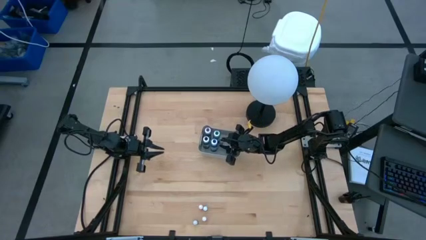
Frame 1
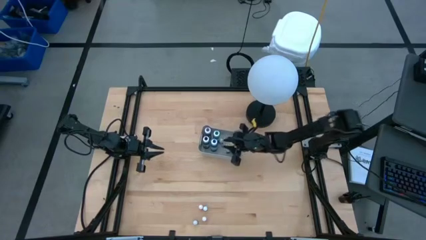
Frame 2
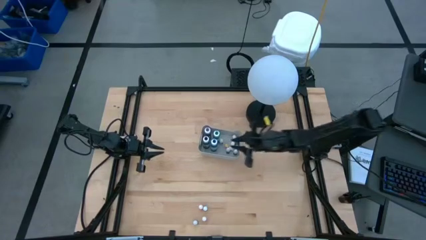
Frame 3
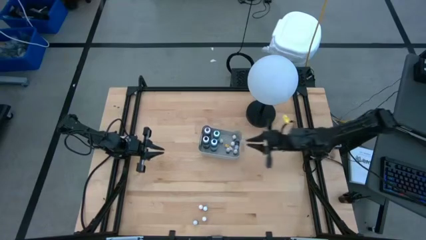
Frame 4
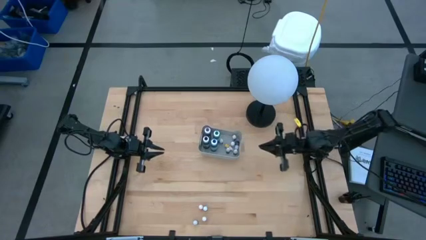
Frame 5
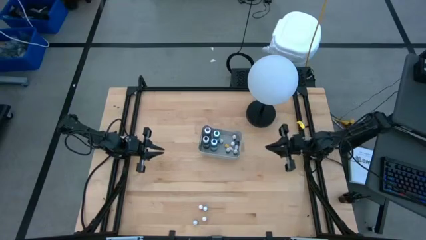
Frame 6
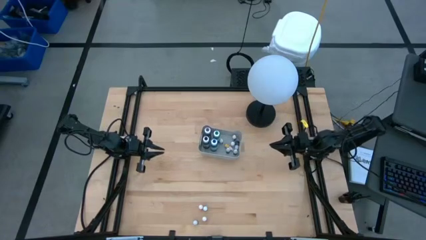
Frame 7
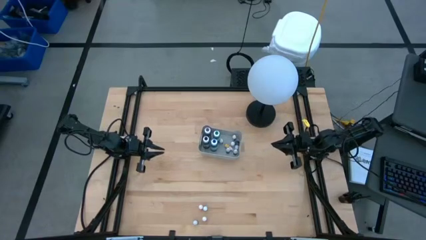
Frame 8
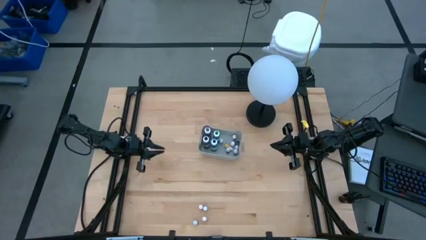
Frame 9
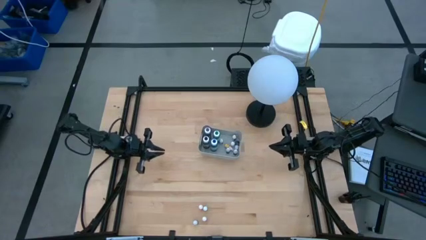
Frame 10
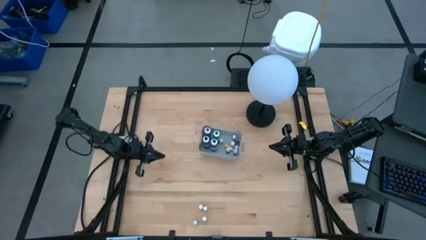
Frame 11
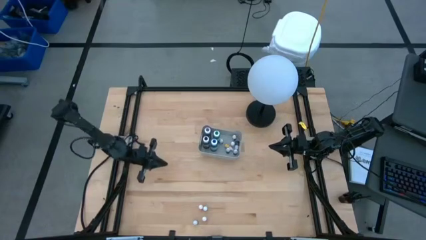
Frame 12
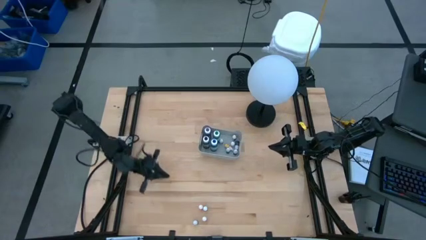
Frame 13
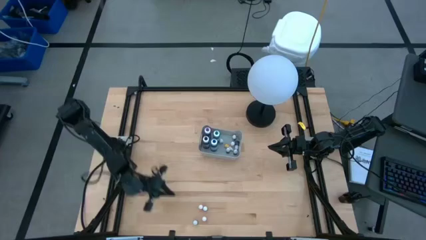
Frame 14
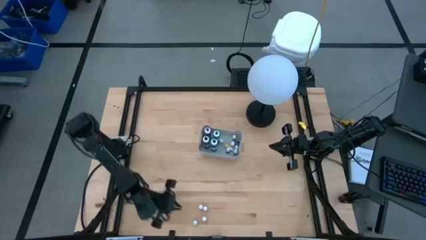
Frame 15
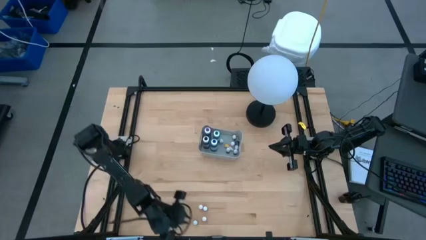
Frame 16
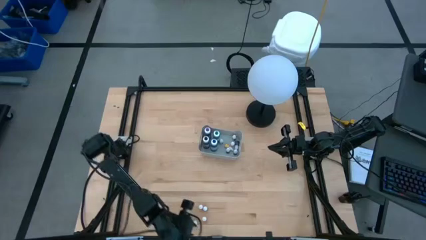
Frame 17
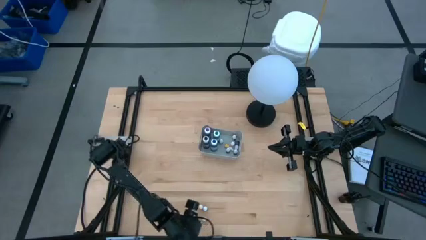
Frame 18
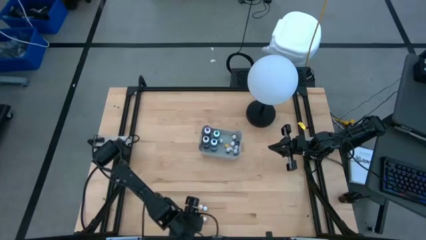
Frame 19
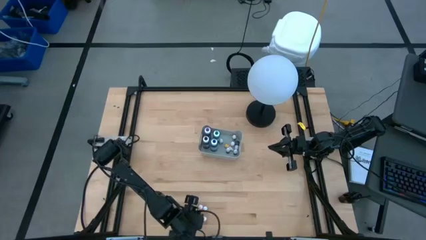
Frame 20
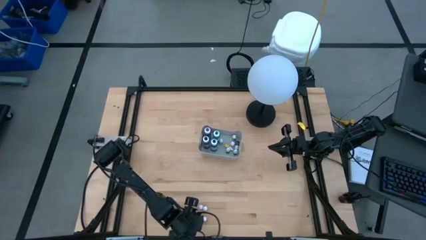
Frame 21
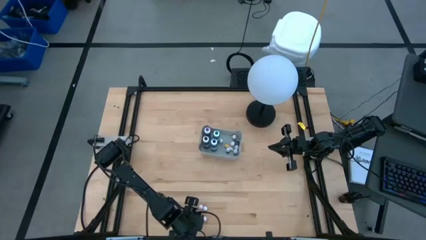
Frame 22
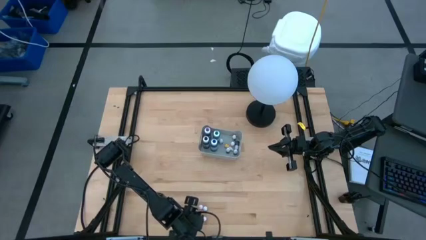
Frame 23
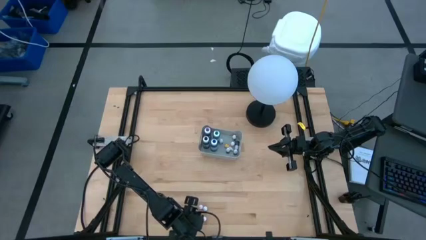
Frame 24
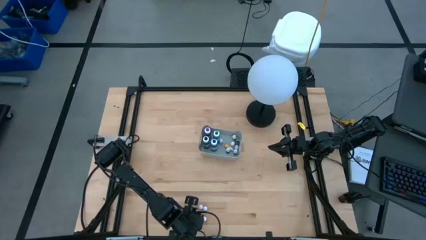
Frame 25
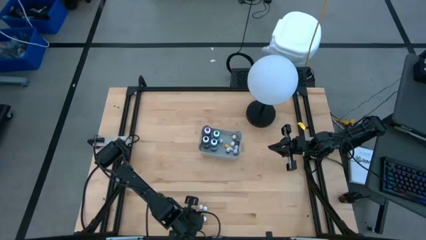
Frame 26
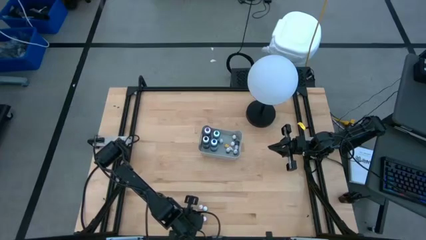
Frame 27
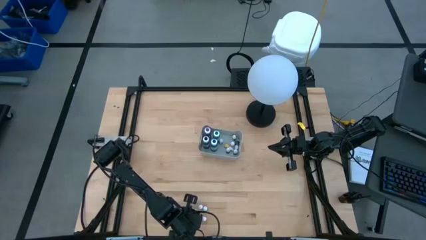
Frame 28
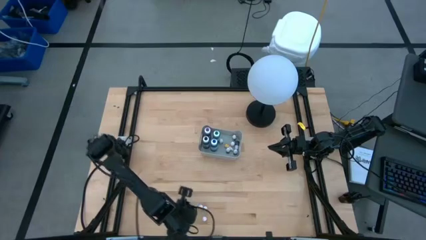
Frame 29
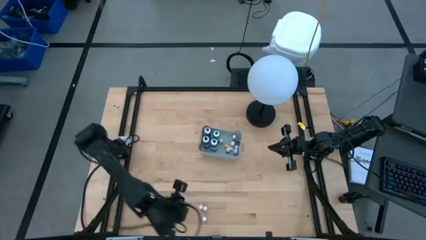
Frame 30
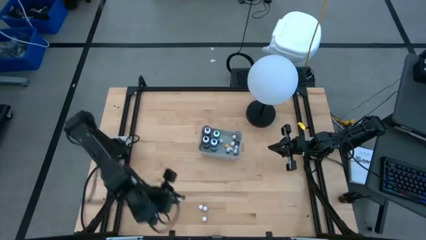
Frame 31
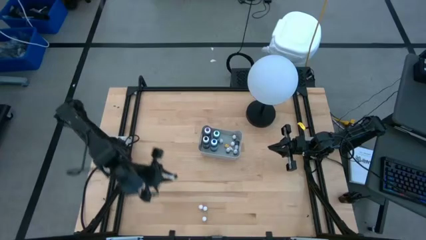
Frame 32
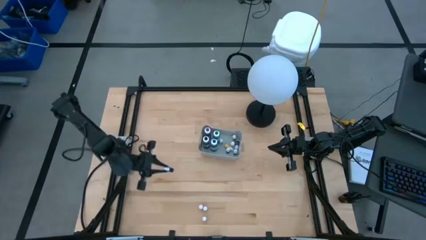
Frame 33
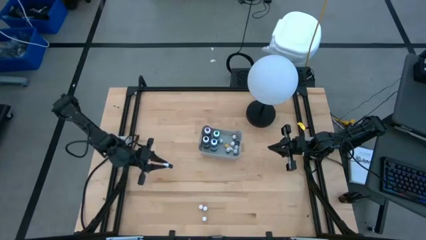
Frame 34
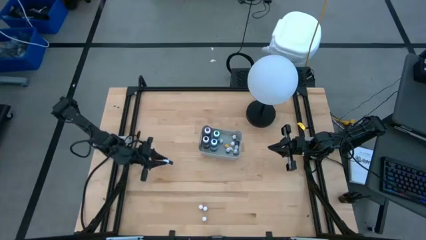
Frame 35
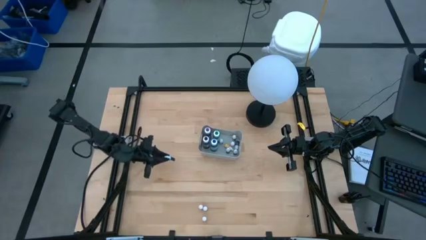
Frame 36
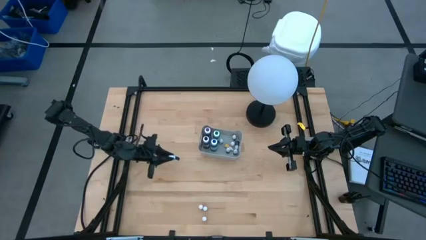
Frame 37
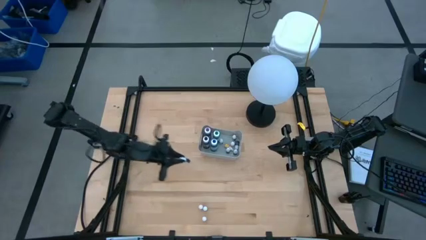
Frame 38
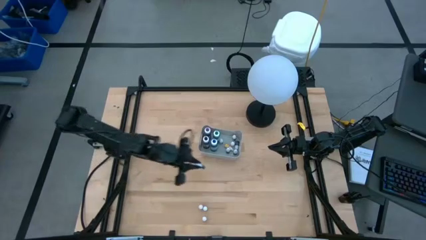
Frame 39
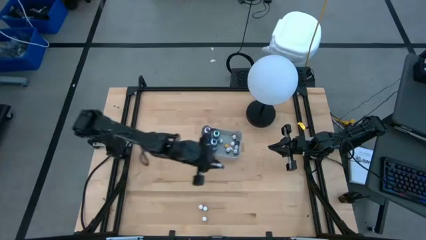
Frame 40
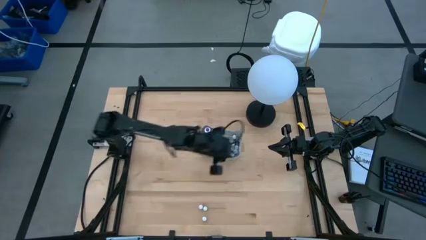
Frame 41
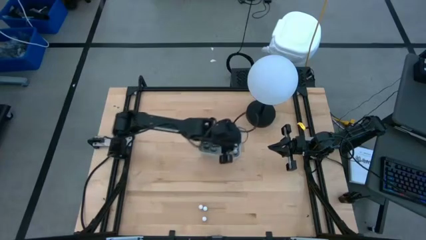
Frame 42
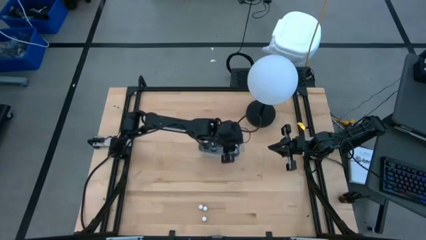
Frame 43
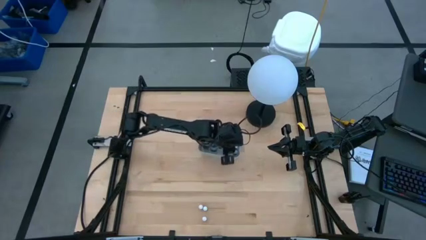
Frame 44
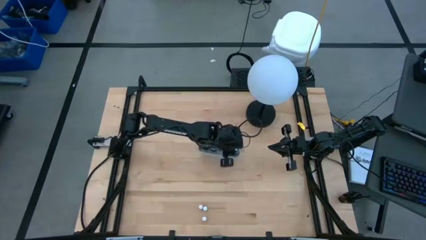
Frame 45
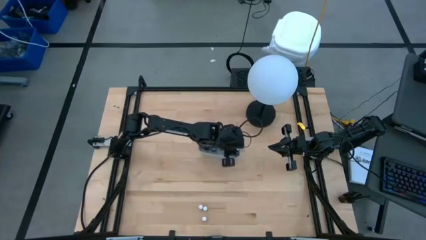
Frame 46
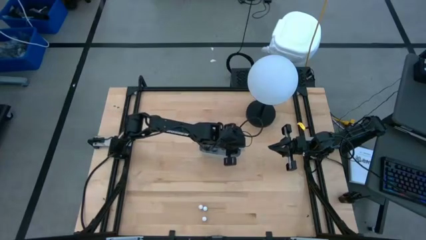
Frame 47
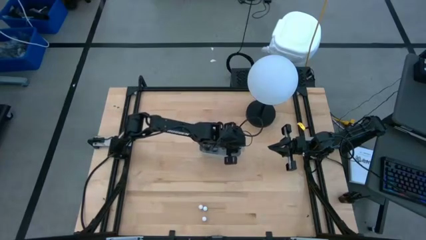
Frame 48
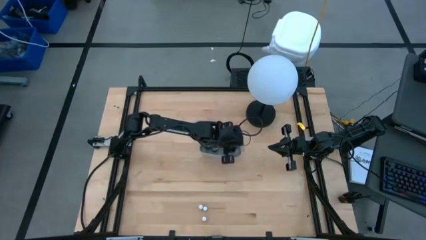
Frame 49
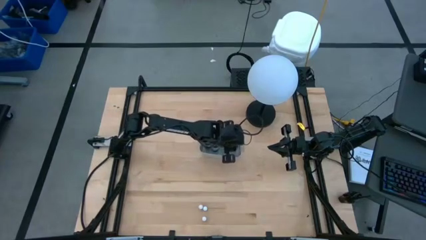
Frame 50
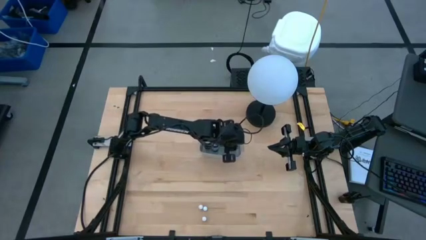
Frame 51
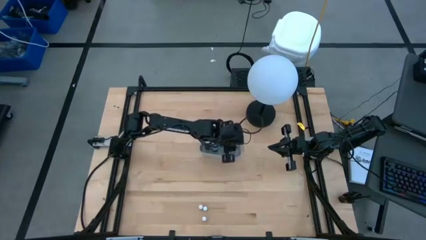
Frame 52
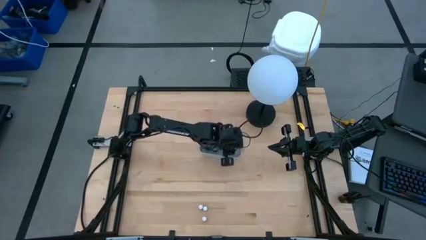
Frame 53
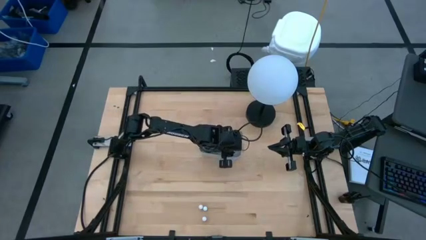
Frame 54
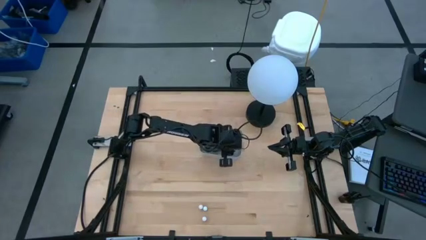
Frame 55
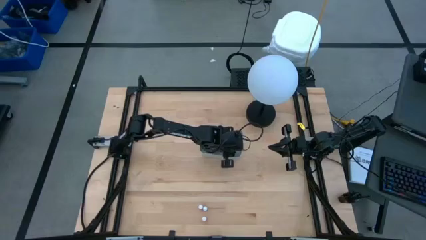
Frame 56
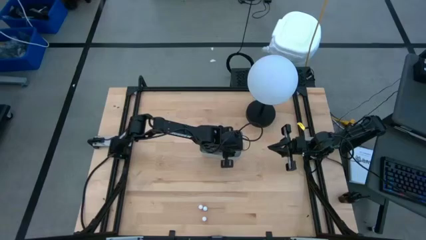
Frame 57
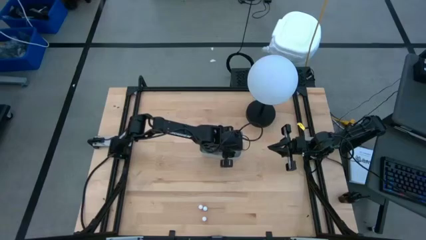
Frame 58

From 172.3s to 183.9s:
Task: Pick & Place food coloring
Put the small blue food coloring bottle into the gray bin

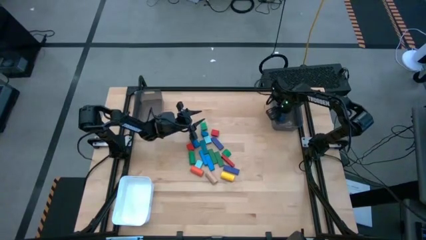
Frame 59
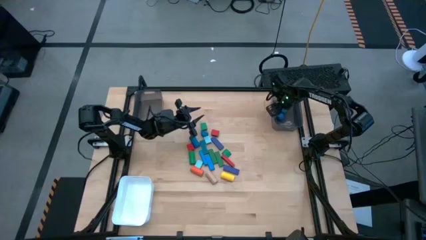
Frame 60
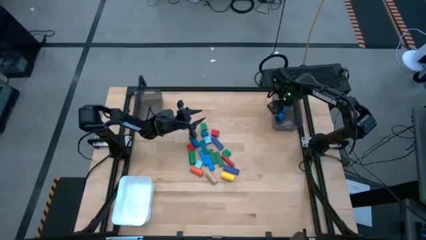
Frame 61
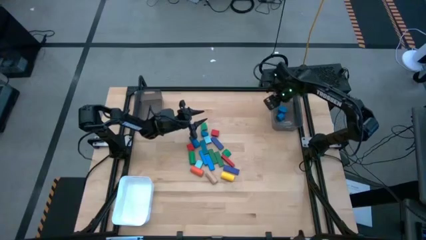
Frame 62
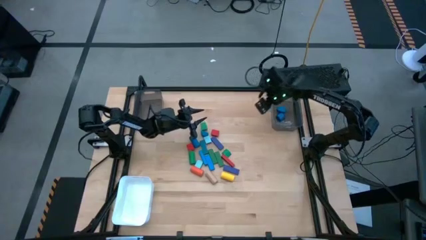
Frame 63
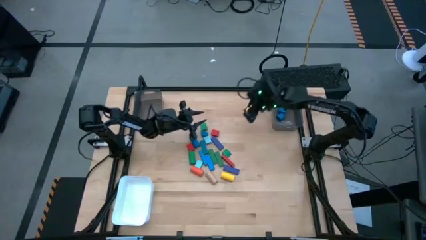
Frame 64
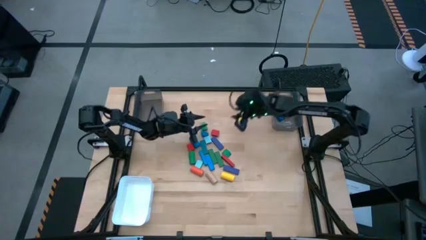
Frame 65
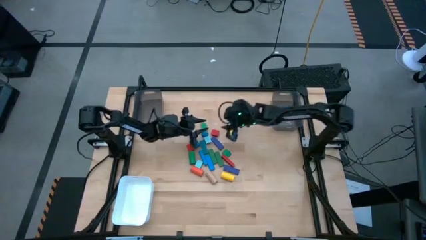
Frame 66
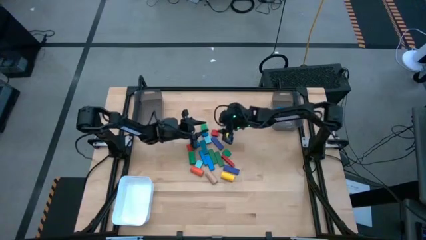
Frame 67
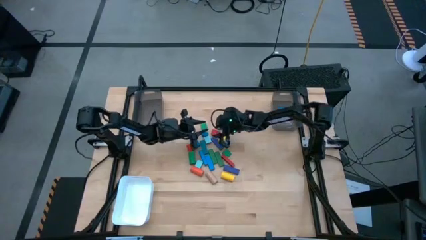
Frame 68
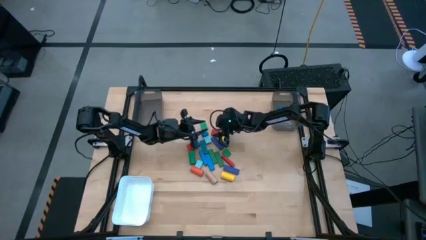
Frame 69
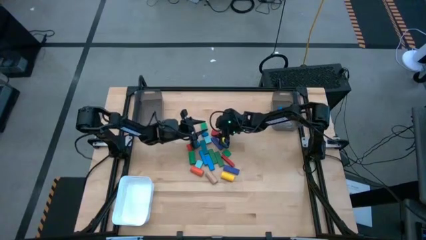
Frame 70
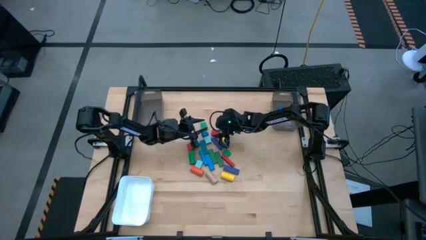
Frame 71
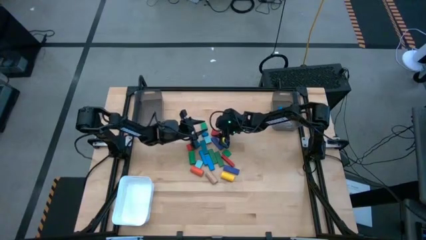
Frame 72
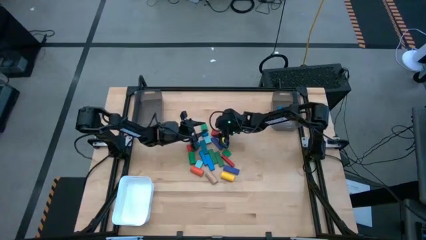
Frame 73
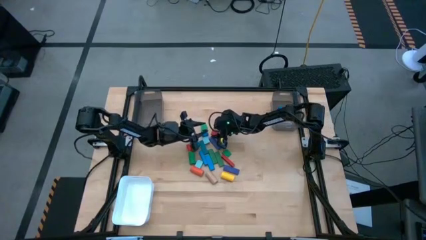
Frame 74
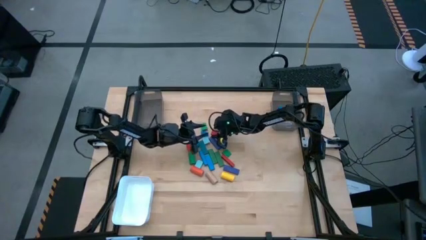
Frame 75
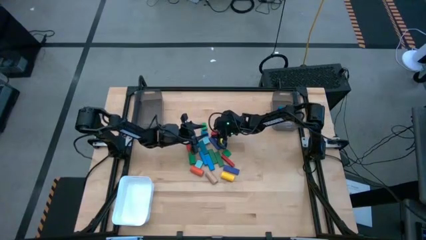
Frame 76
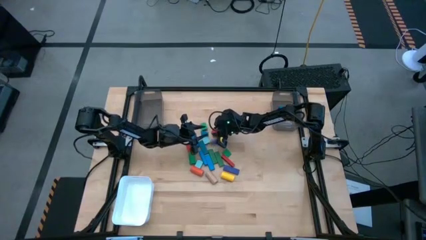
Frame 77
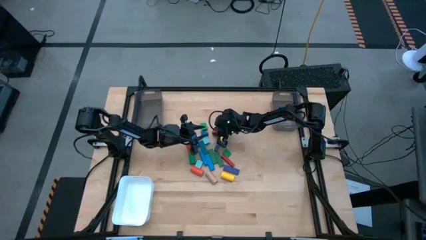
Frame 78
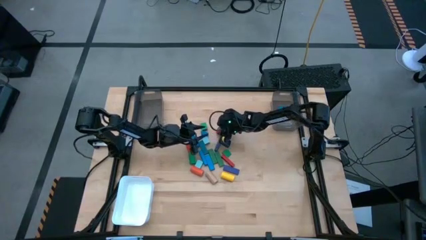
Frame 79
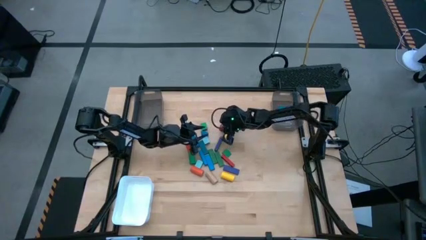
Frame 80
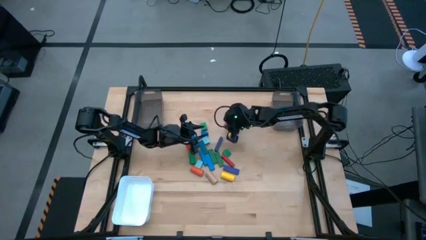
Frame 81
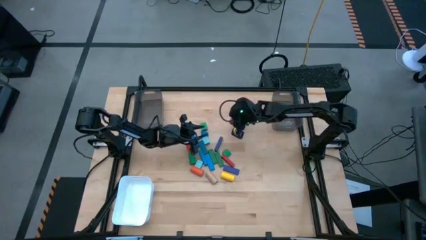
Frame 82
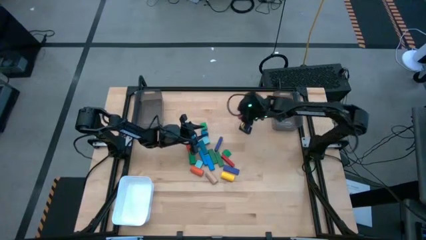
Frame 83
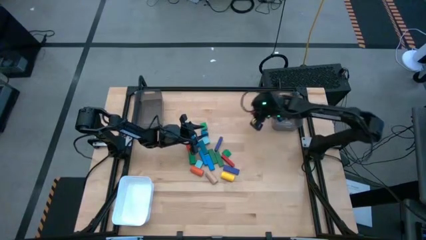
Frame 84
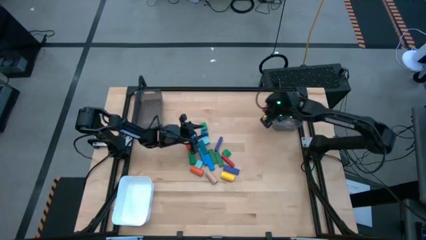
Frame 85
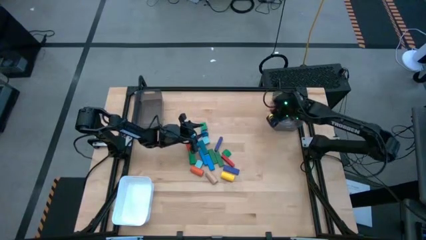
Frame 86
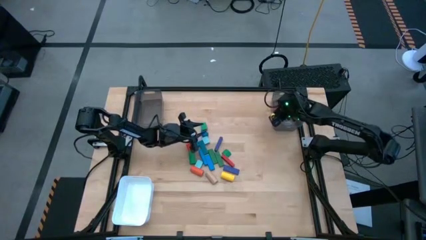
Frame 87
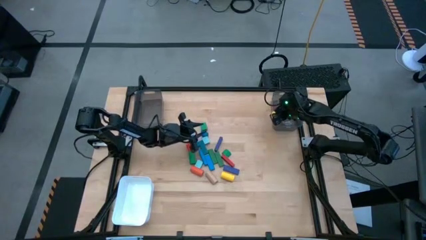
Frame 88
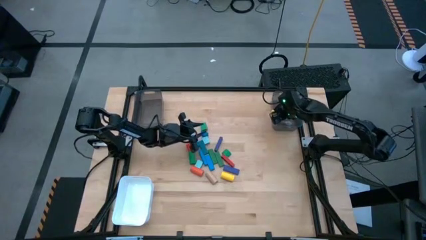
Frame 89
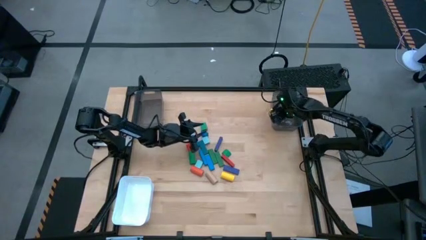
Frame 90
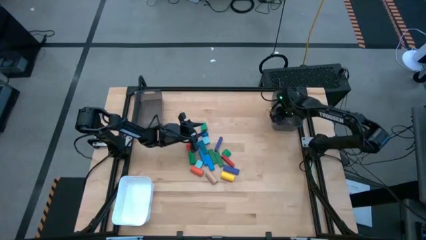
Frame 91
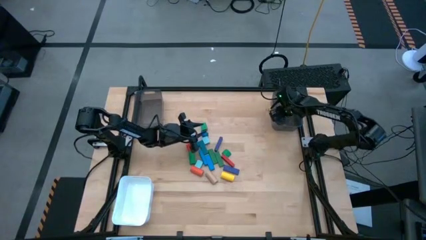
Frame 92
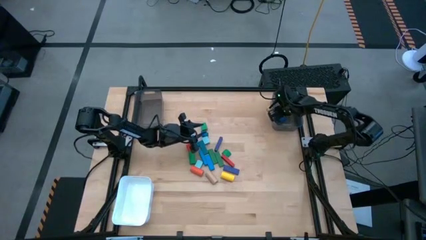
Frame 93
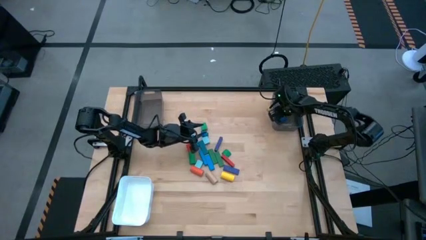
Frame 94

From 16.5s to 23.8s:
Task: Sort blocks by size
Put the red half circle block into the right black bin
